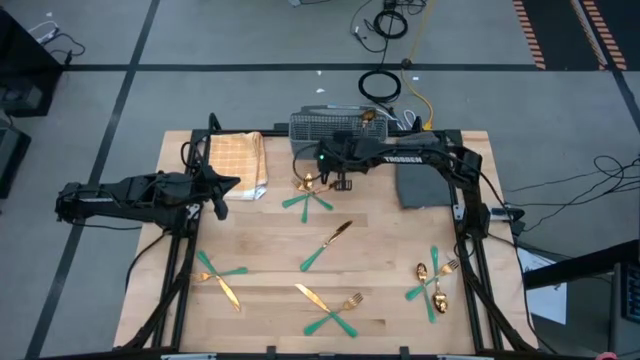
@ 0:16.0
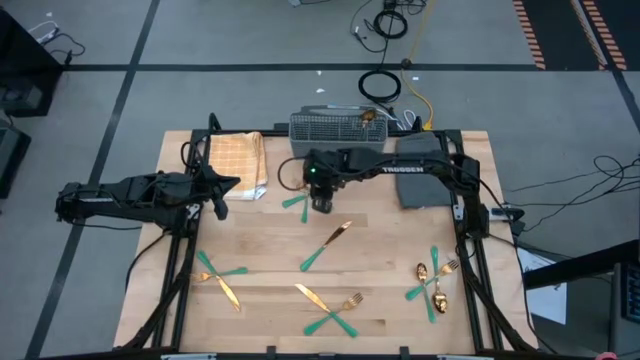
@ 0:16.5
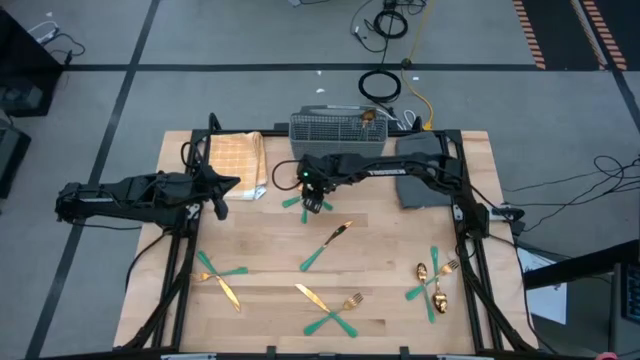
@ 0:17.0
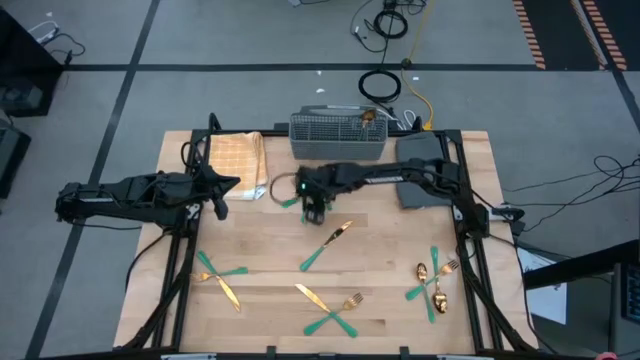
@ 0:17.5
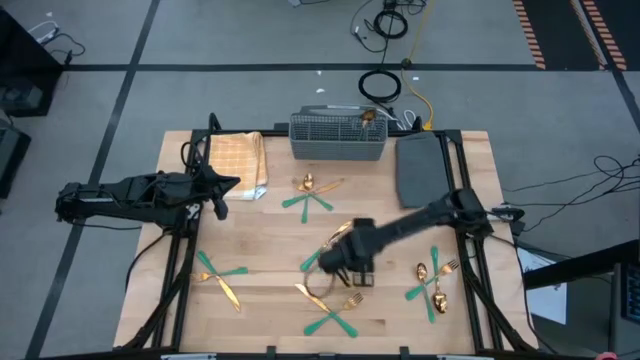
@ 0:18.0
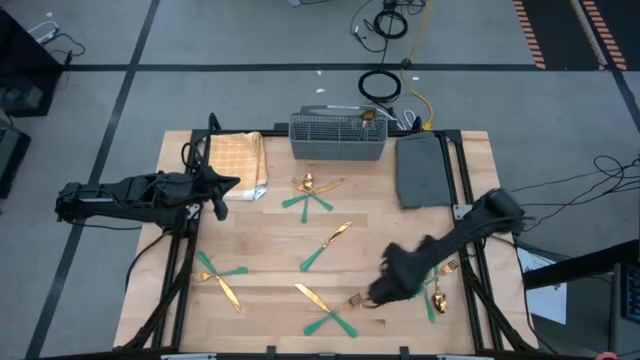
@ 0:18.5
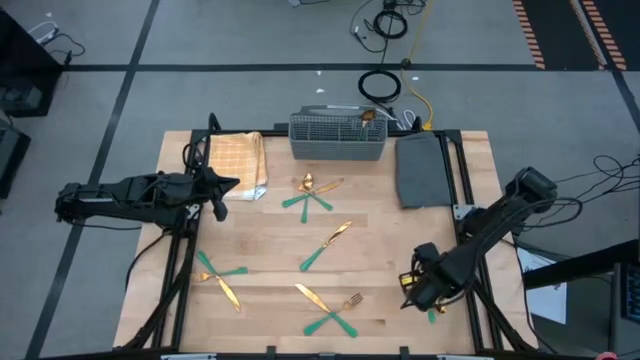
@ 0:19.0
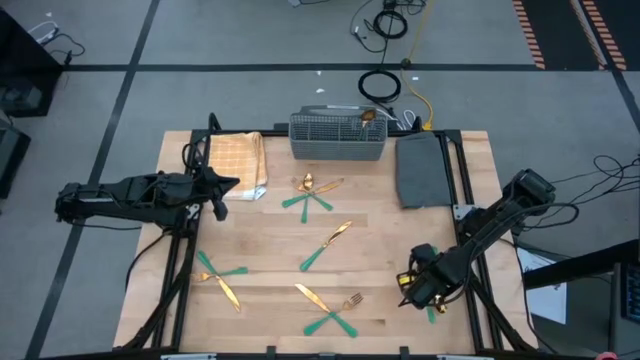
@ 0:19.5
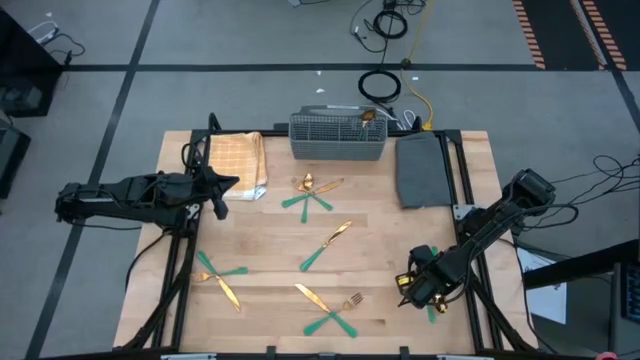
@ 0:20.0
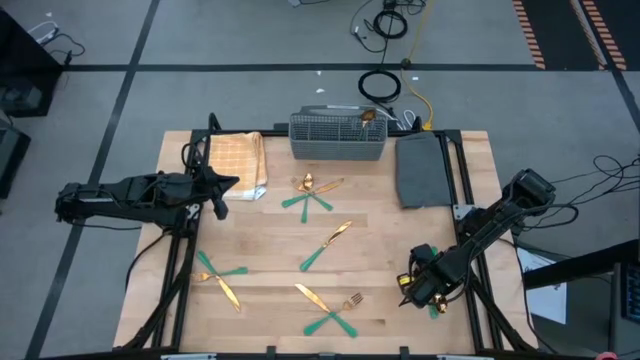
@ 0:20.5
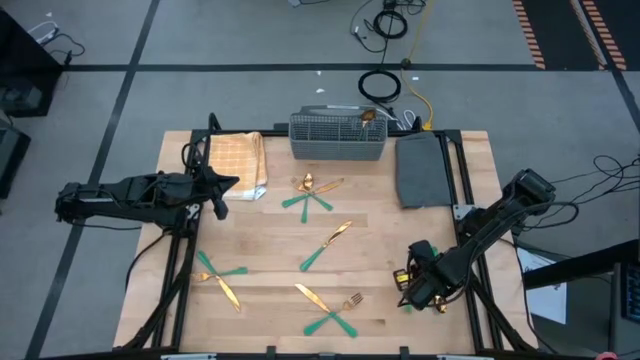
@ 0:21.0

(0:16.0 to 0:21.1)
Task: Sort silverware
Put the spoon into the middle right section of the dish rack

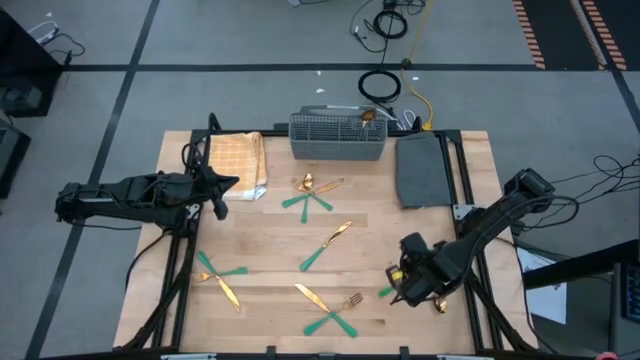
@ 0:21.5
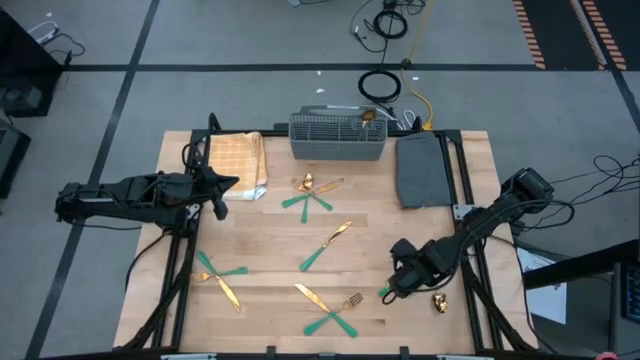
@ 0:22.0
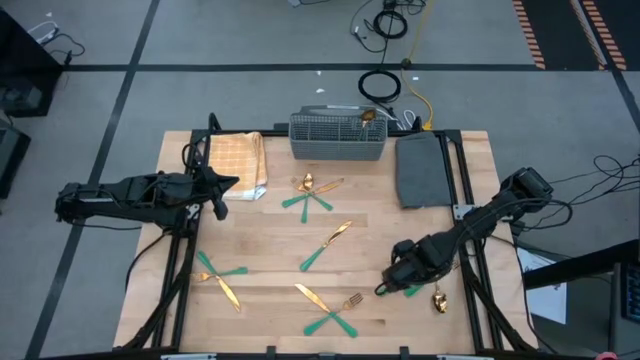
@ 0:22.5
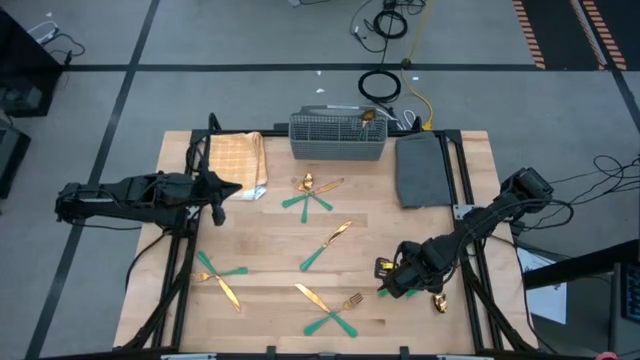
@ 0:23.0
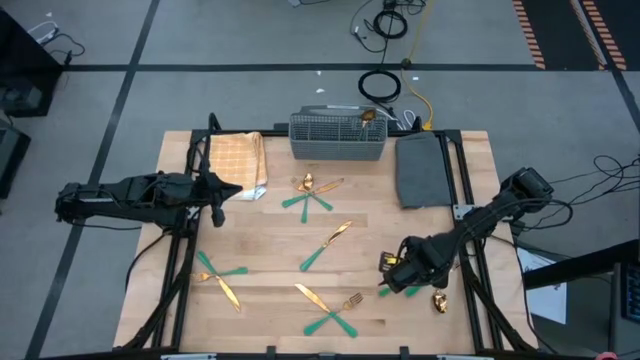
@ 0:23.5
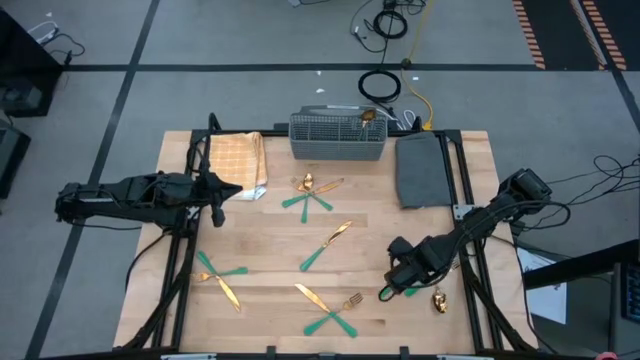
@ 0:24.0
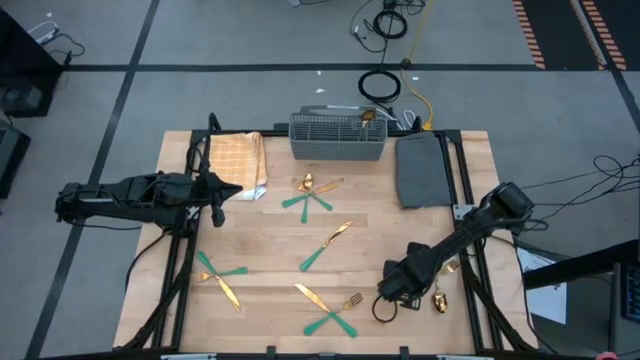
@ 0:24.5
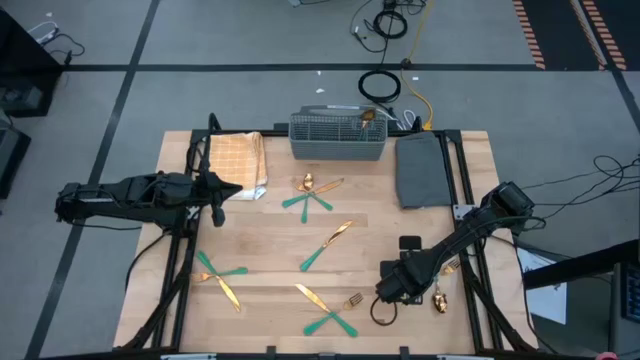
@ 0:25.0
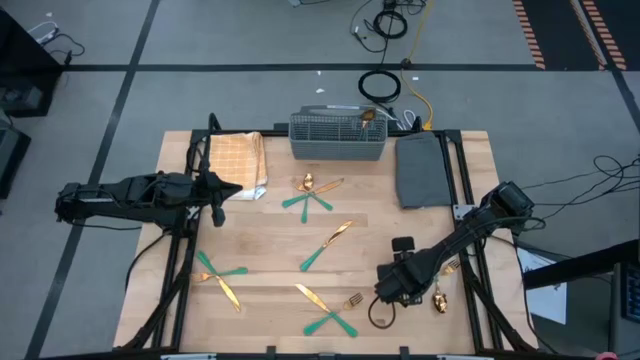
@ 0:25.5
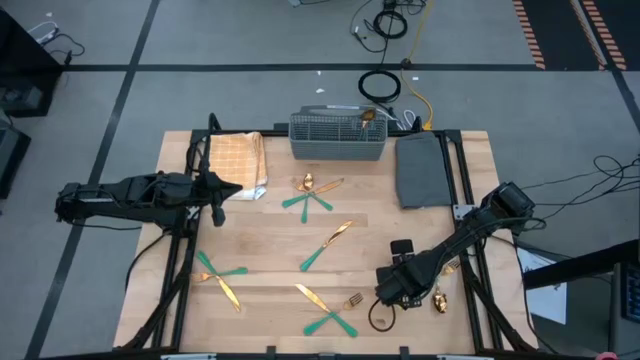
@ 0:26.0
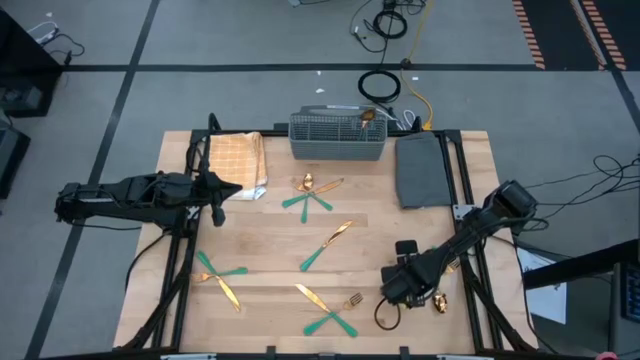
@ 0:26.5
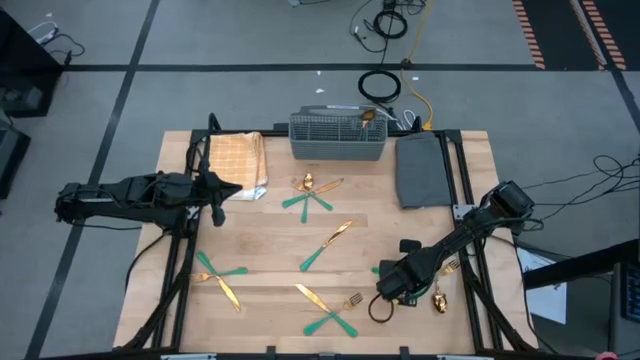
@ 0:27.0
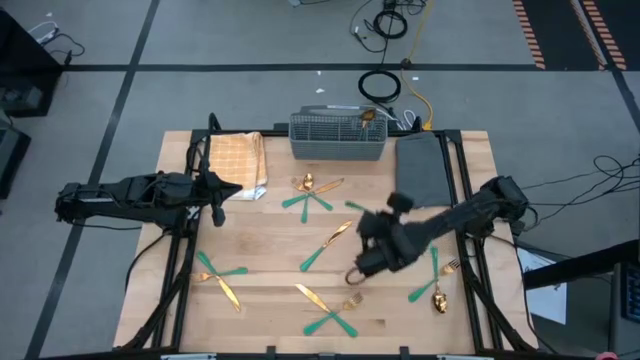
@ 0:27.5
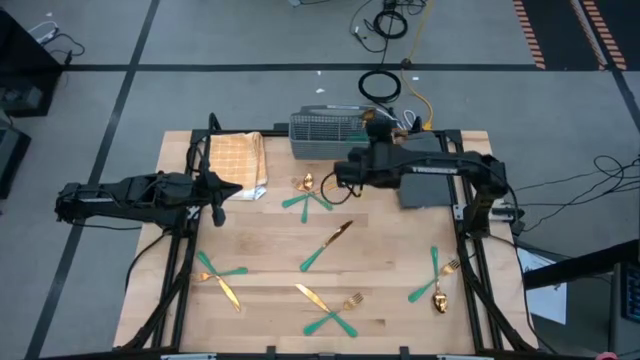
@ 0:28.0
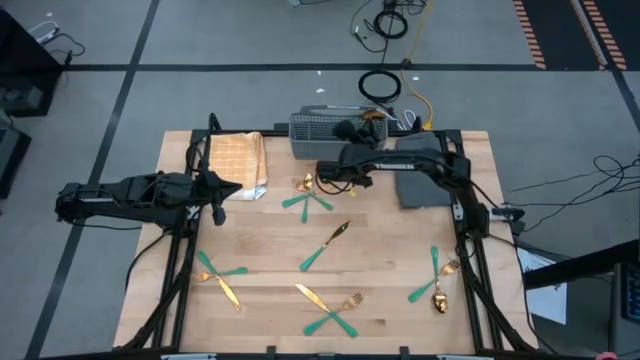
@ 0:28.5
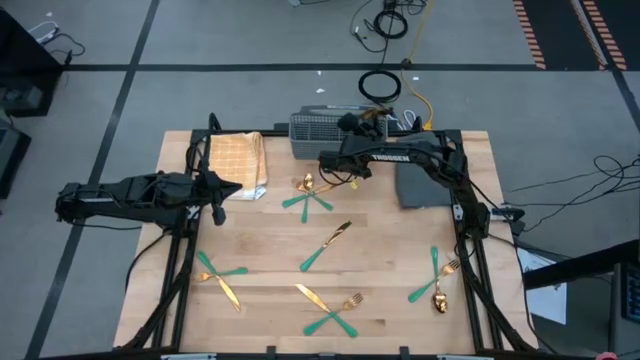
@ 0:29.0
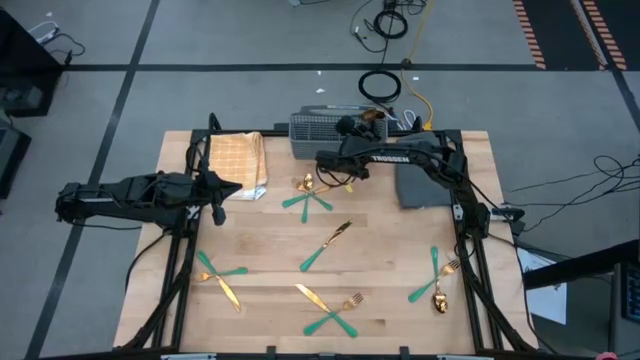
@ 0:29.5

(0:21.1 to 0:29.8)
Put the spoon into the middle right section of the dish rack

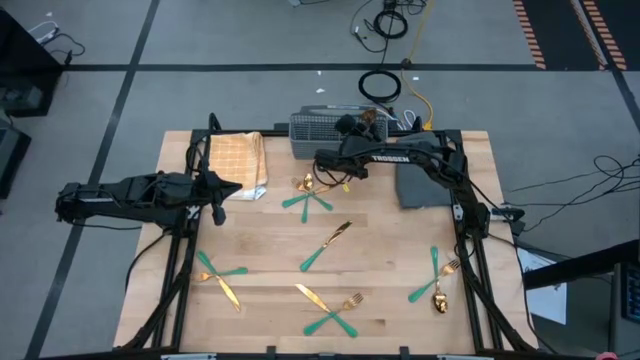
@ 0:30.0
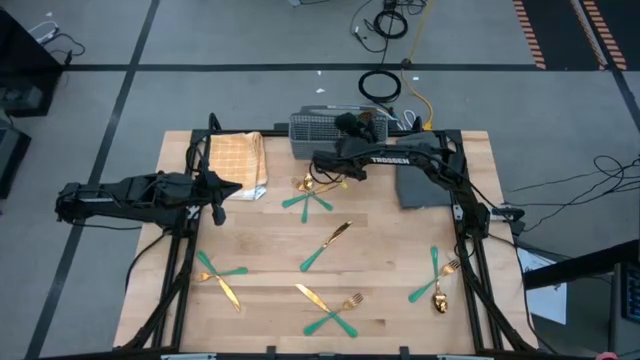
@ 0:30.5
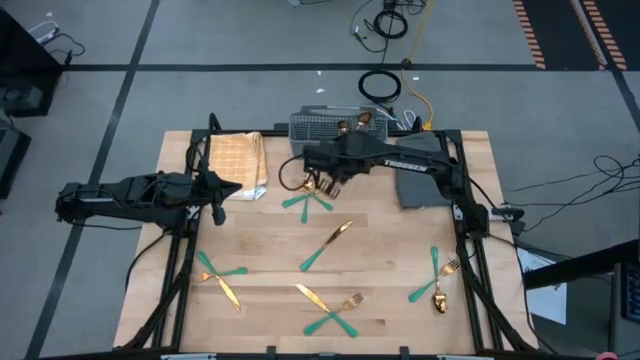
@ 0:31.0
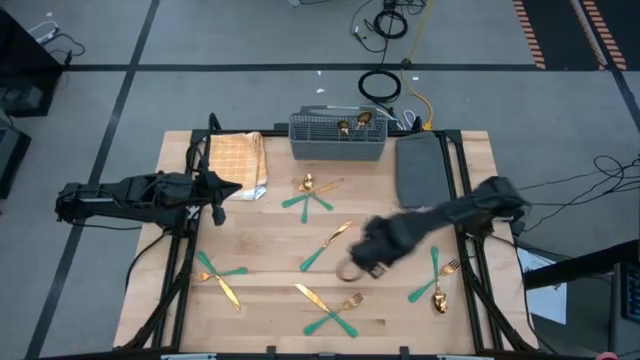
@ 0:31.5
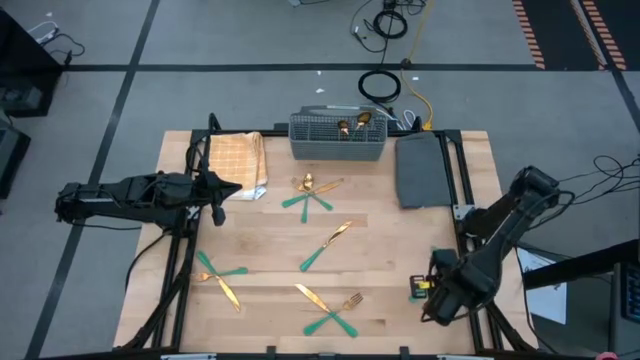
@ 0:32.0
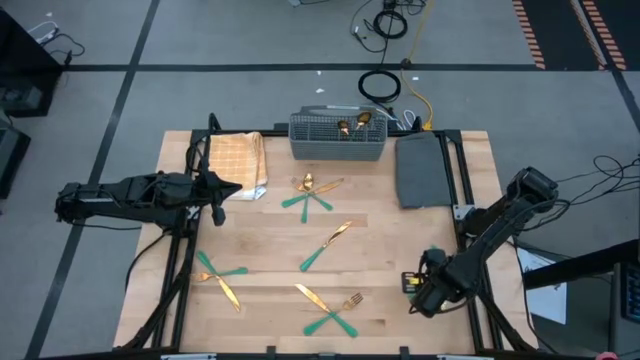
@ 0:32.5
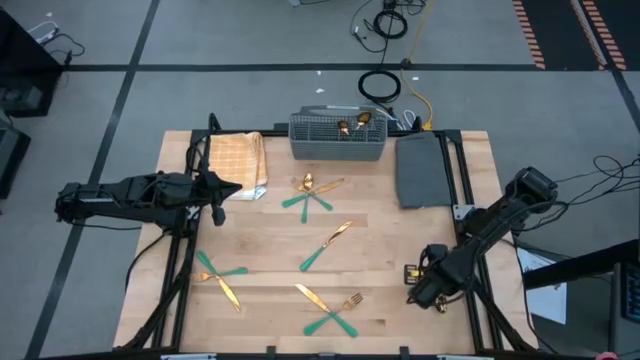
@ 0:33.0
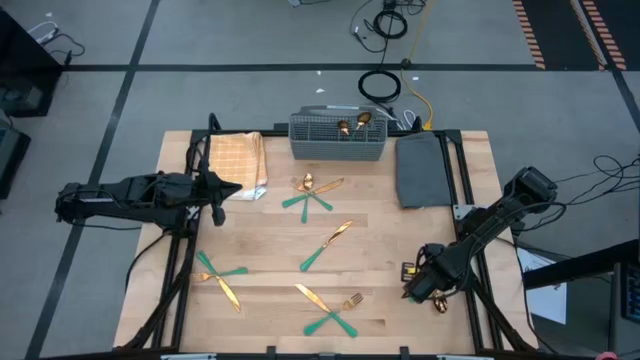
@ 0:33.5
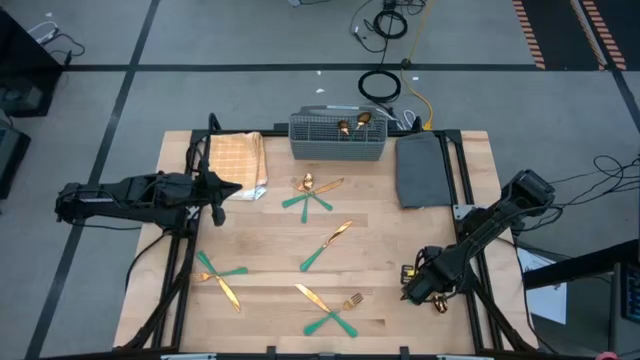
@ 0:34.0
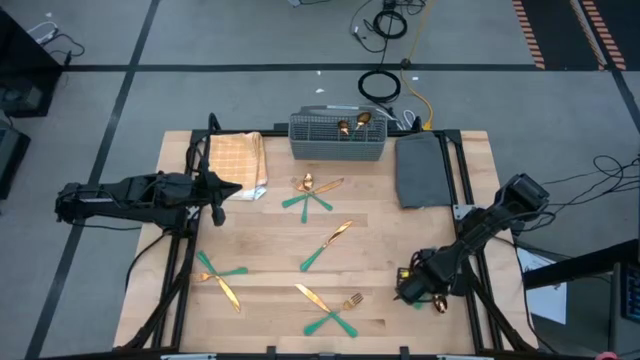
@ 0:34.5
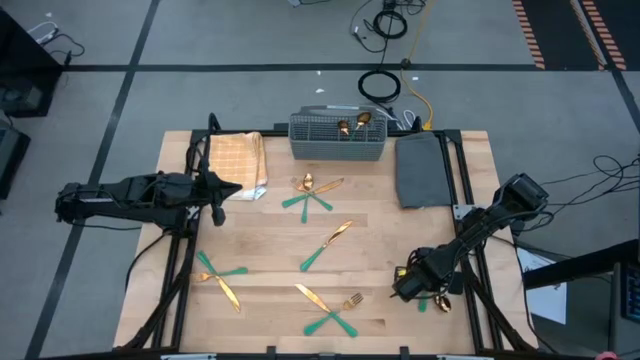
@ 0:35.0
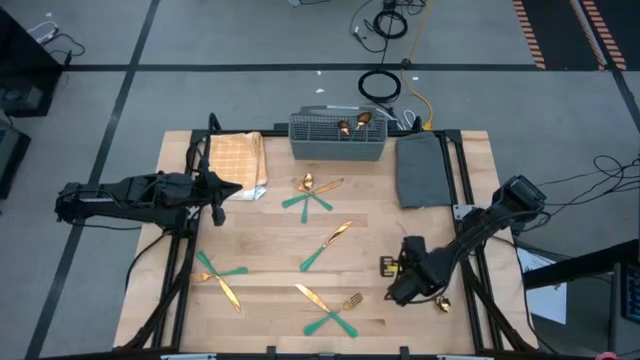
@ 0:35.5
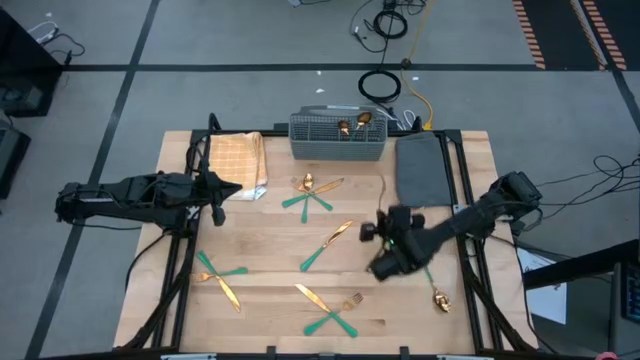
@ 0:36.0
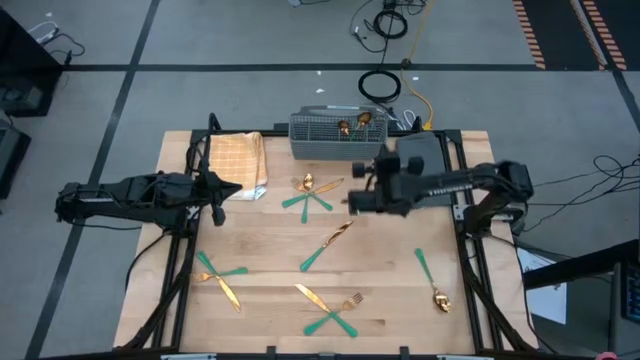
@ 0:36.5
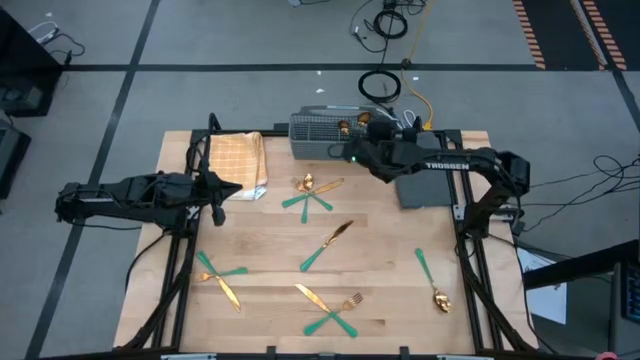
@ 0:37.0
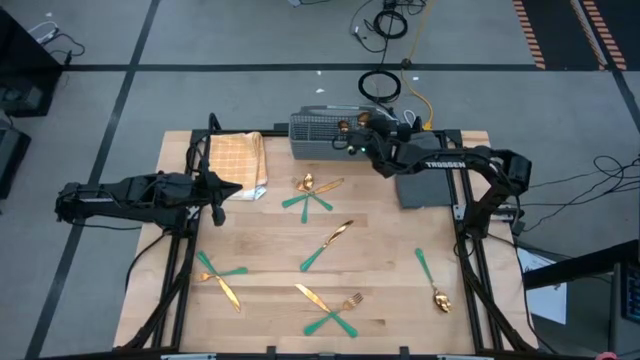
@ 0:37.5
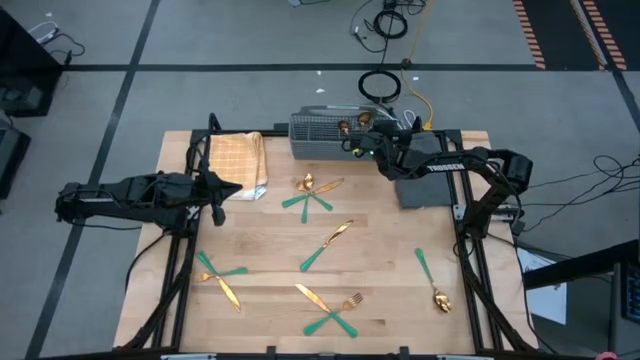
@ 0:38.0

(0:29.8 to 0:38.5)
Put the fork into the right section of the dish rack
